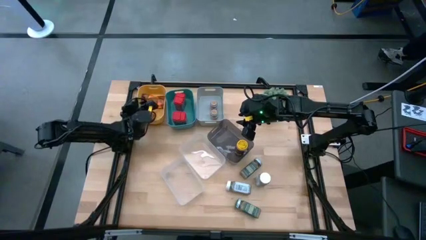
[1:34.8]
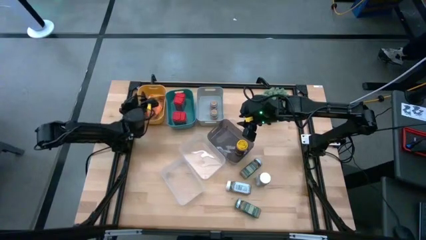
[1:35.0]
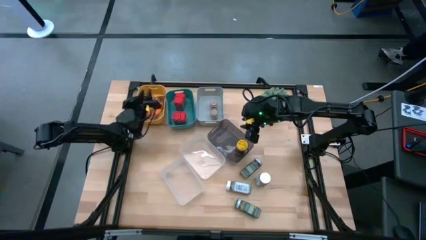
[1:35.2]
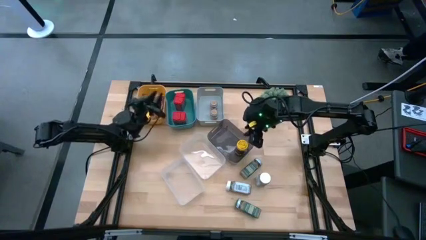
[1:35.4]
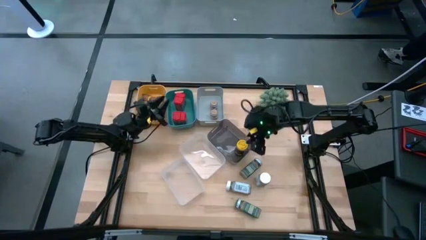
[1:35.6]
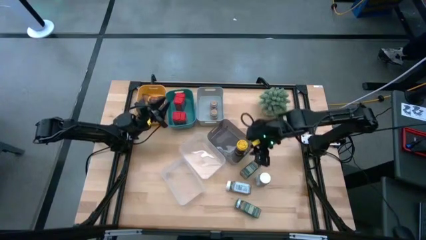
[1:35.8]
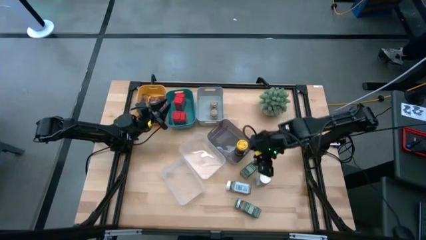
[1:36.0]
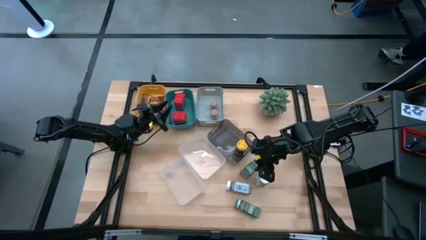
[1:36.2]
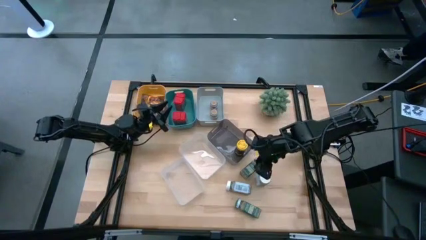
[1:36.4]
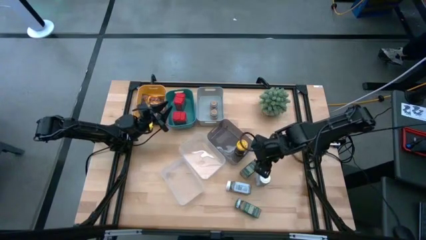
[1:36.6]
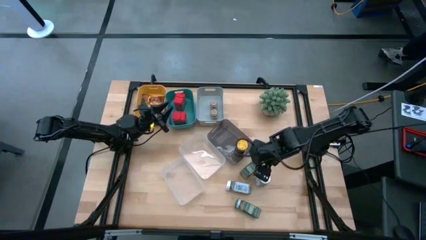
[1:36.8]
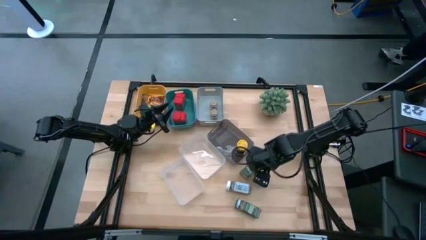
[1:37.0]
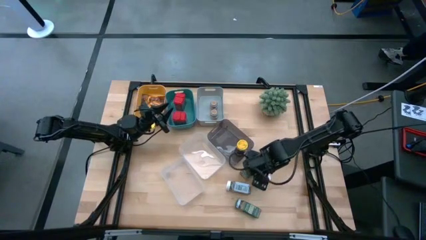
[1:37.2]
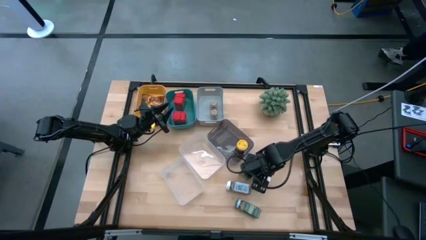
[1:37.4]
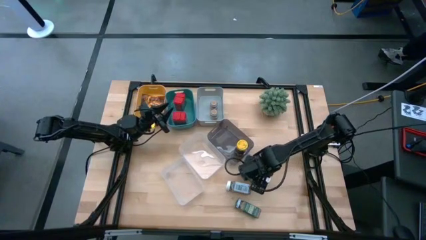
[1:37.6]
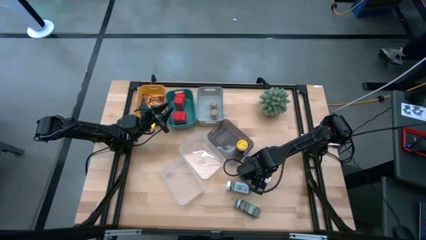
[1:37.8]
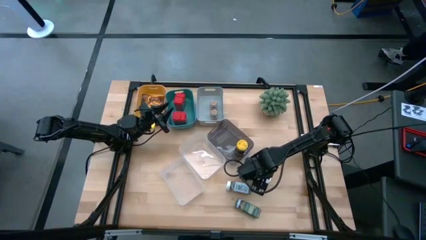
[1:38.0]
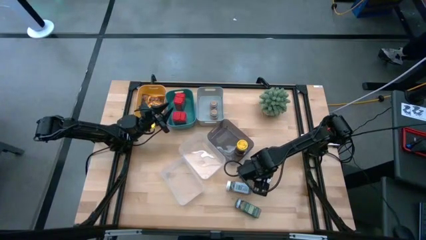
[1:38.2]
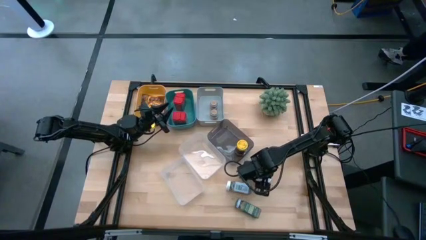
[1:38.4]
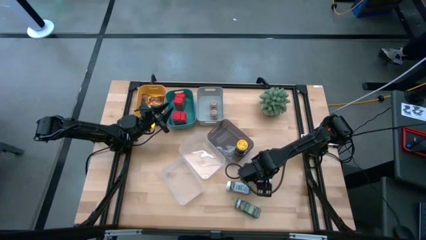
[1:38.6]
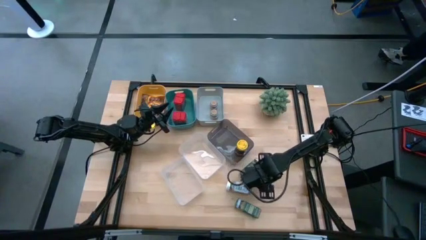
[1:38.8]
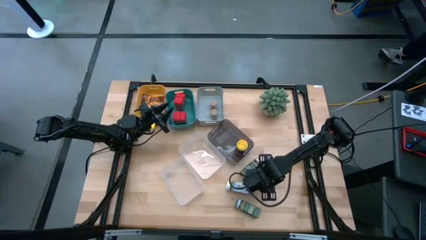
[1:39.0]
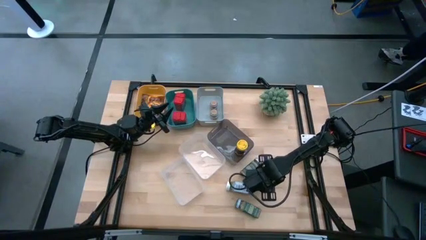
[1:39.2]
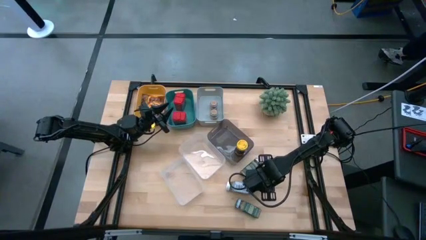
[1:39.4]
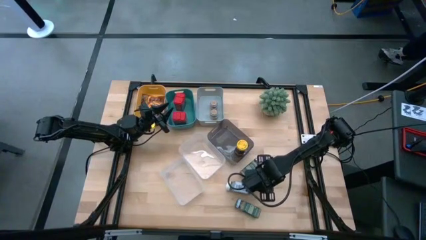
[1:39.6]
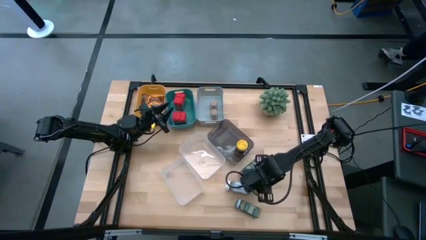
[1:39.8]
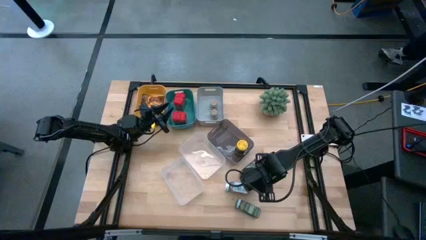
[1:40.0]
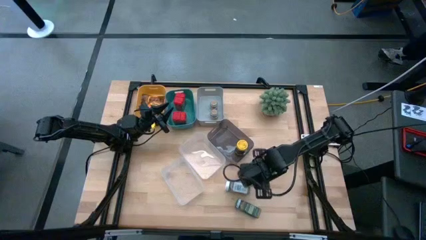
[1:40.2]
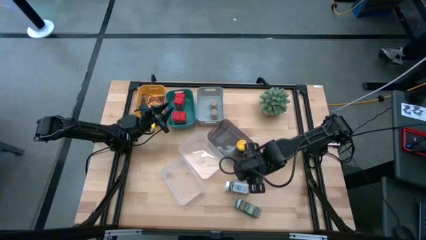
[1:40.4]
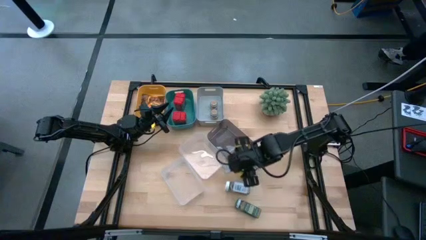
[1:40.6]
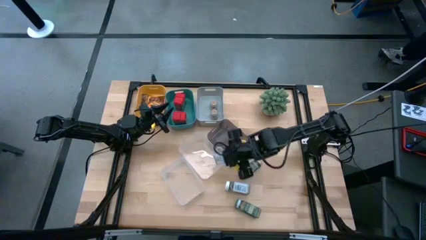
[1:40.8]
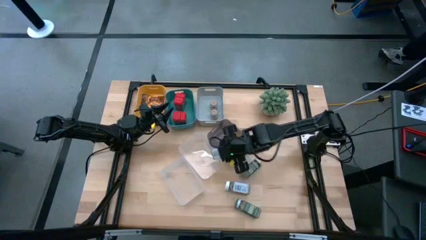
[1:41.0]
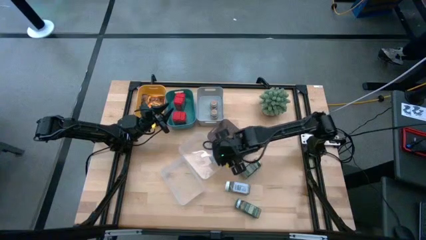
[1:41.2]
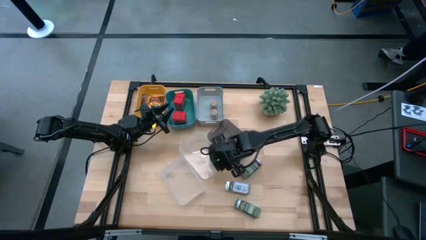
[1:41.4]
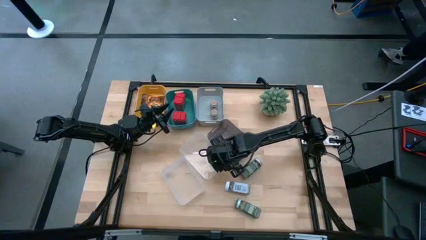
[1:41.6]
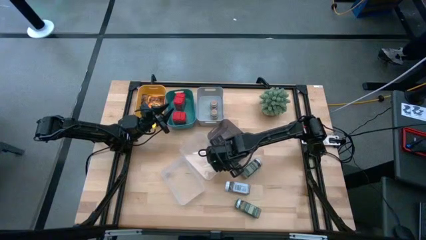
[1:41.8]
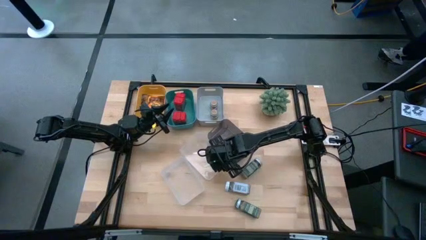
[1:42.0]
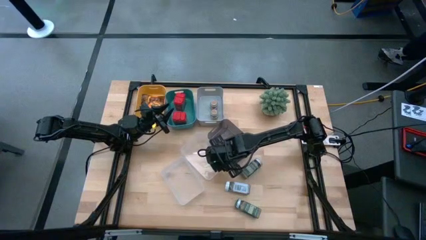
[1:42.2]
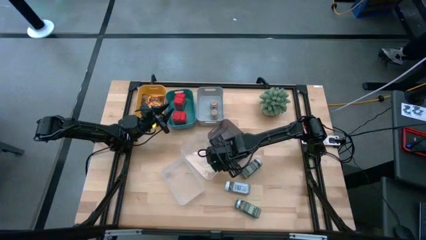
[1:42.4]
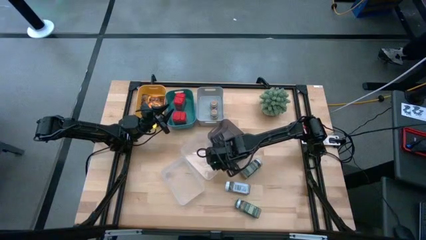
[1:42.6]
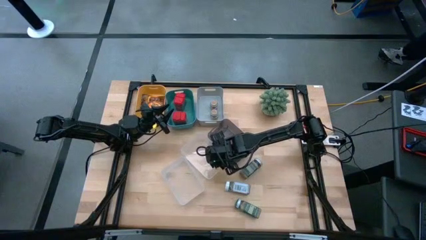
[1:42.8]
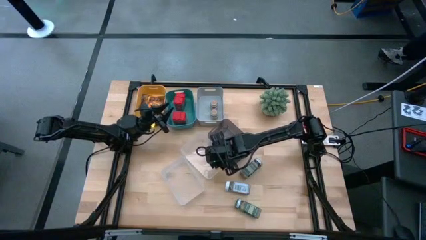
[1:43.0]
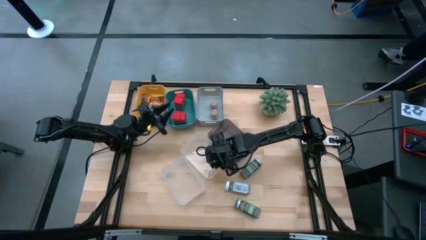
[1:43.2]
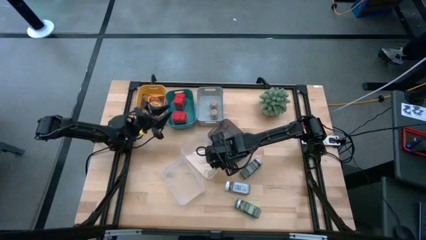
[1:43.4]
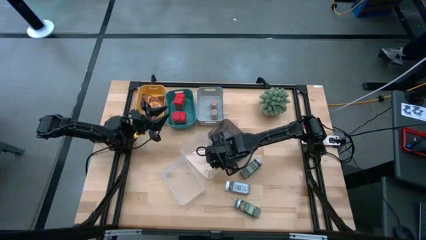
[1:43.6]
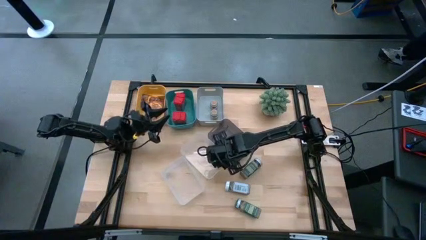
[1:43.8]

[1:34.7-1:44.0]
Task: Sort spices by type
Put the white seasoning bottle into the top transparent bin

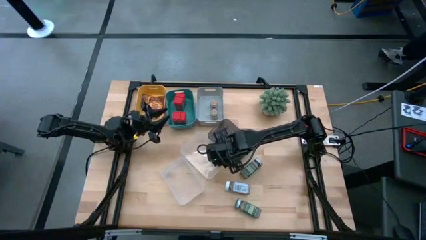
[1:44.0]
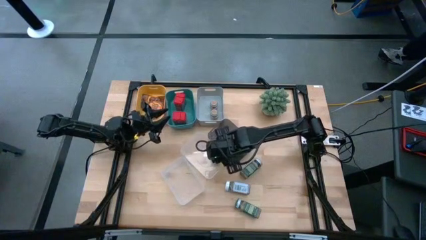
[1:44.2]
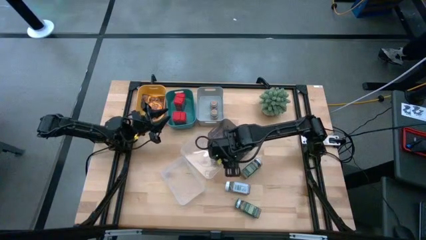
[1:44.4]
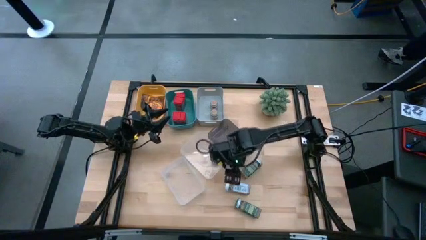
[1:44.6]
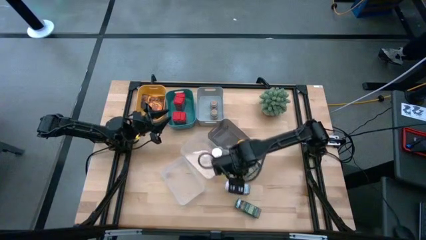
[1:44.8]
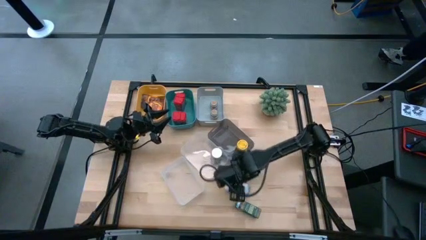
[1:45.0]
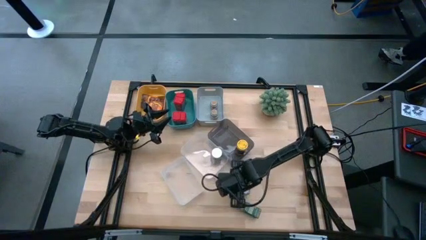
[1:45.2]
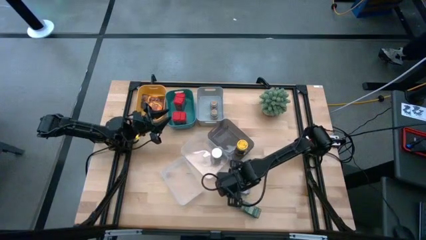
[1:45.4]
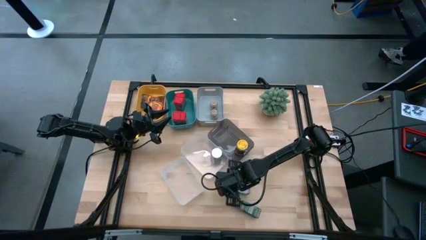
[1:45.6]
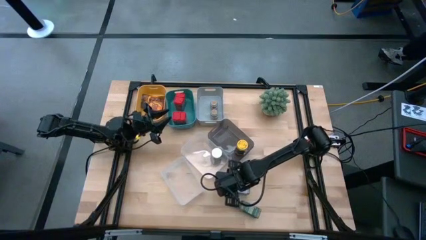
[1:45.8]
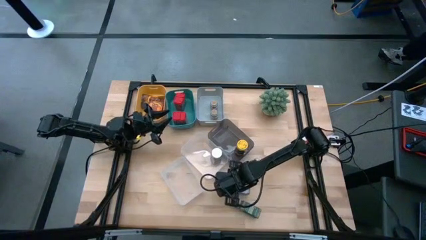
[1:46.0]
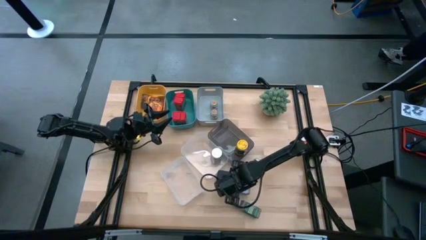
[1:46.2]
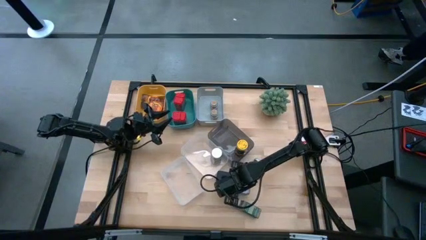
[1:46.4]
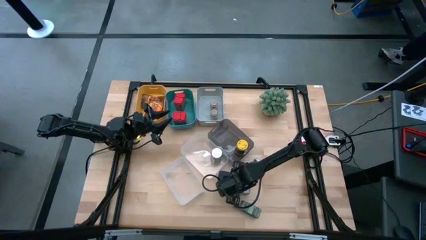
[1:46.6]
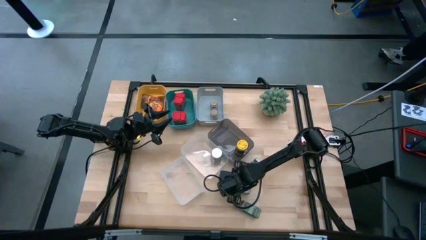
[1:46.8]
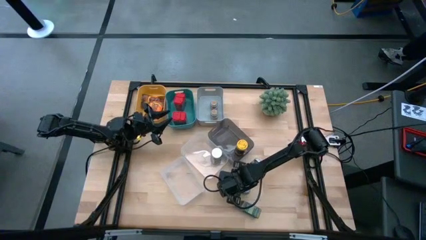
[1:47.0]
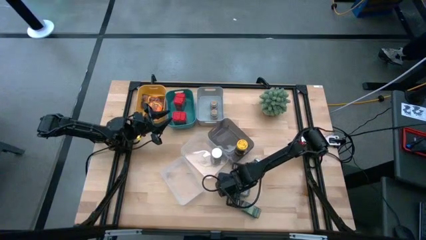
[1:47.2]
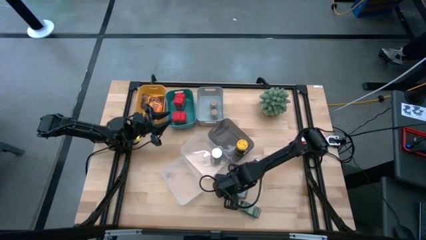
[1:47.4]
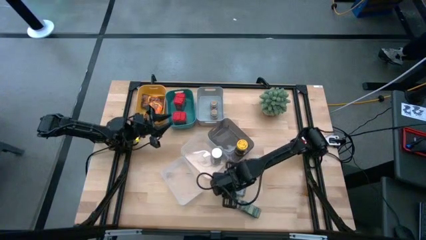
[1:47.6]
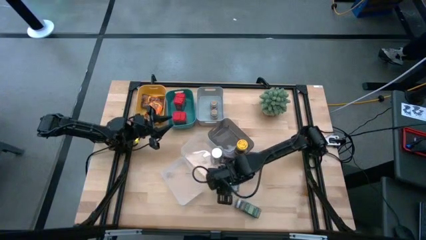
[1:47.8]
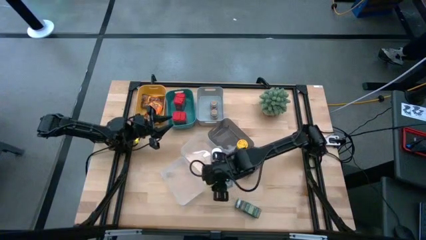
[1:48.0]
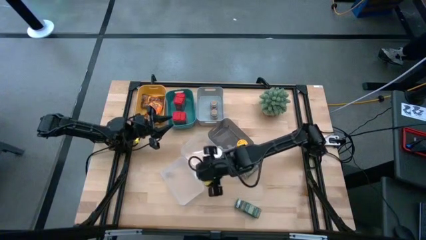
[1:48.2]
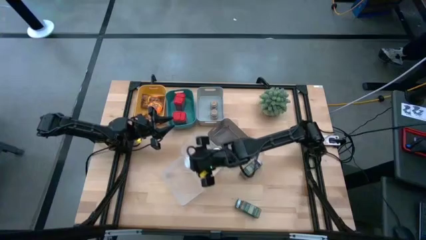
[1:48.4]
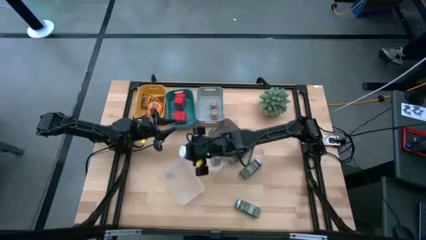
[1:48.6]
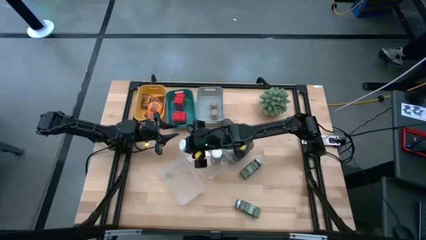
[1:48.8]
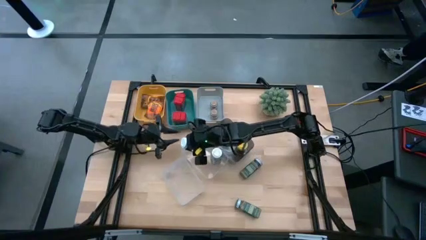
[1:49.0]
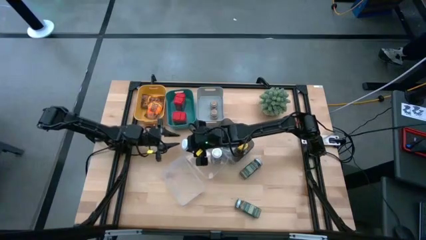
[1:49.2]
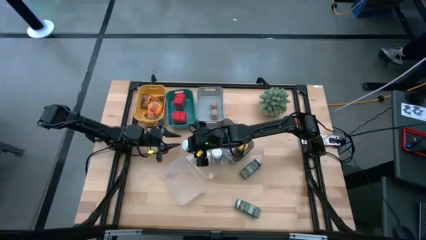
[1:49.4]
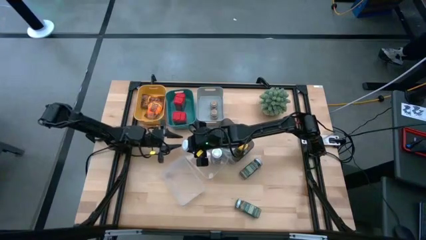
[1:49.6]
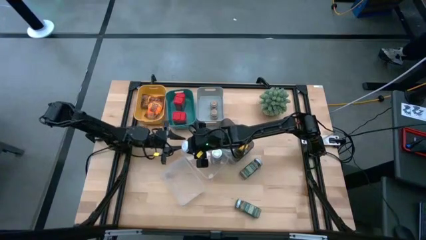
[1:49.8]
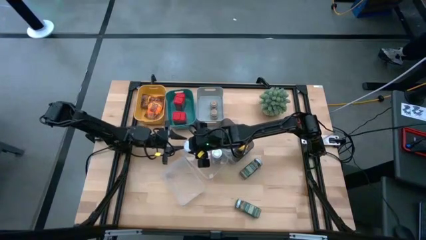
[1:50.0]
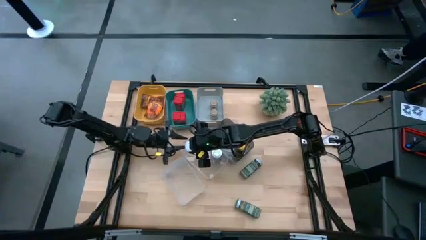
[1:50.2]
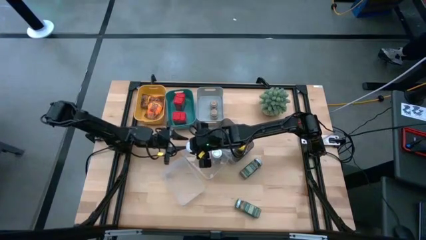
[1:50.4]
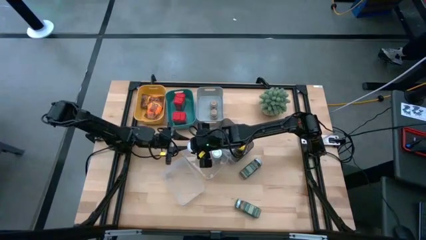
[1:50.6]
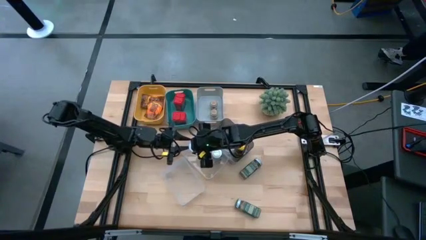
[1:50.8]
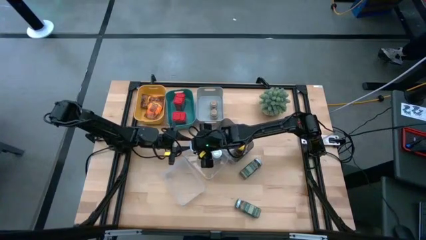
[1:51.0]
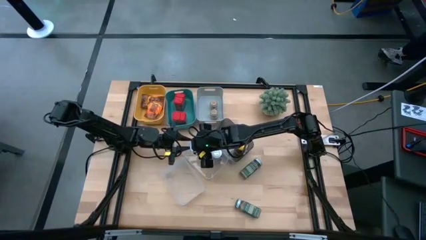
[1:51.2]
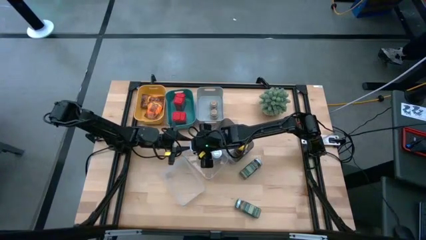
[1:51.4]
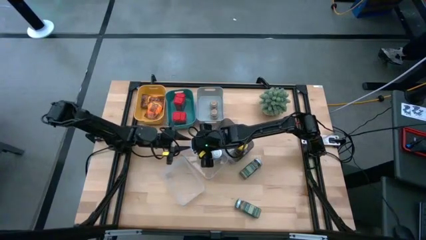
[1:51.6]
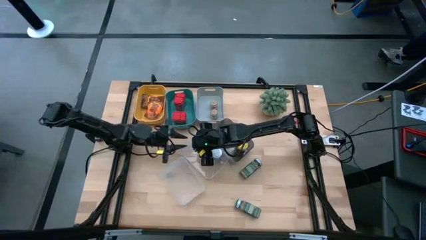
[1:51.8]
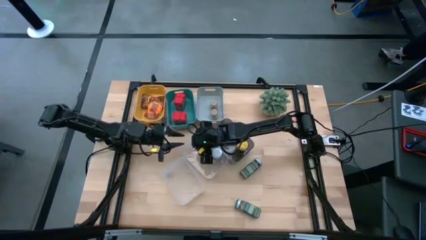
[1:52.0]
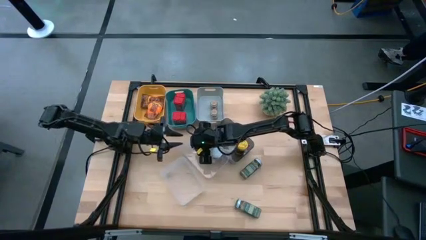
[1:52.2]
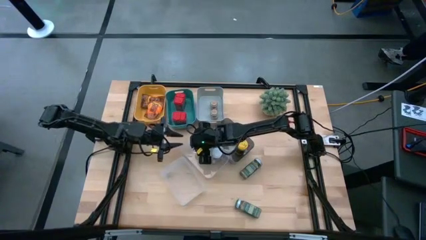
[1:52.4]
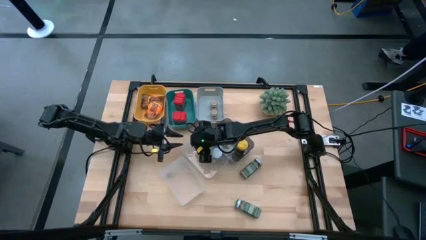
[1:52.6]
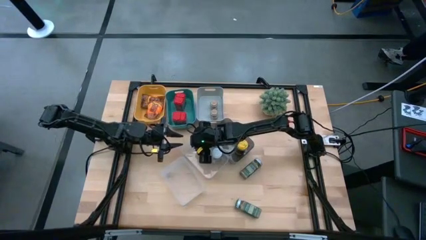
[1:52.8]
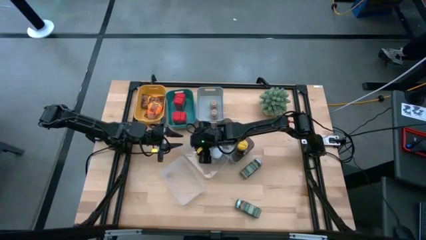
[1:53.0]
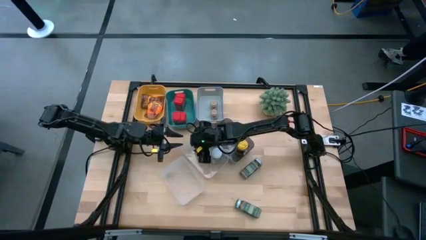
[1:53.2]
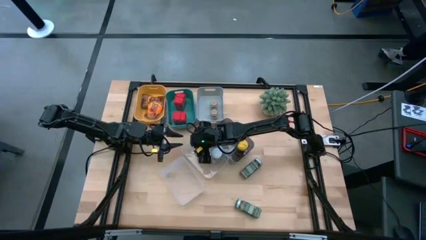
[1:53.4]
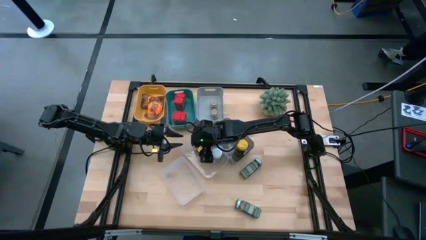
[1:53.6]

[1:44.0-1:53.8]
Put the white seasoning bottle into the top transparent bin
